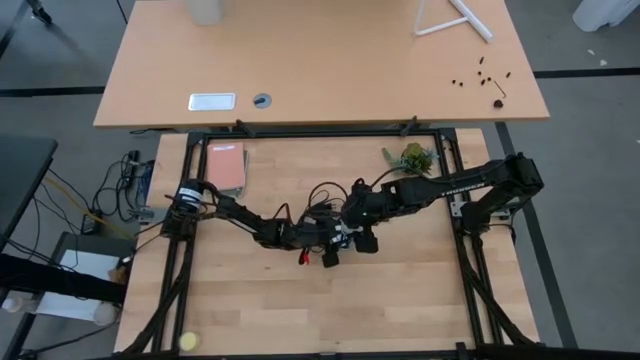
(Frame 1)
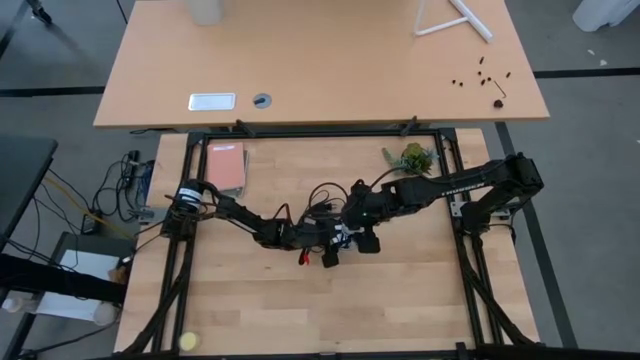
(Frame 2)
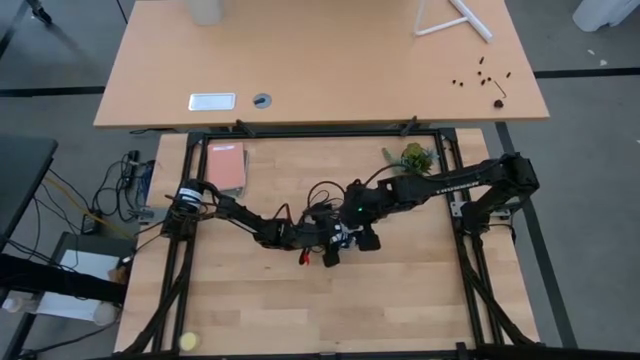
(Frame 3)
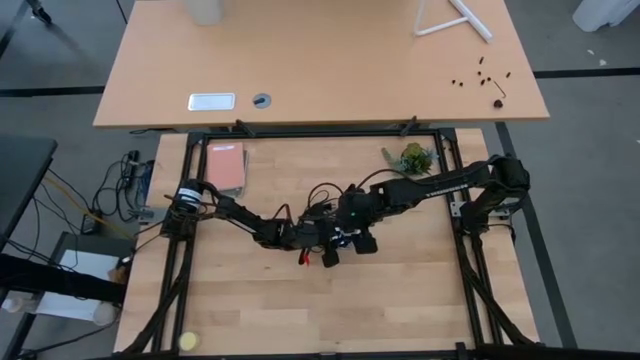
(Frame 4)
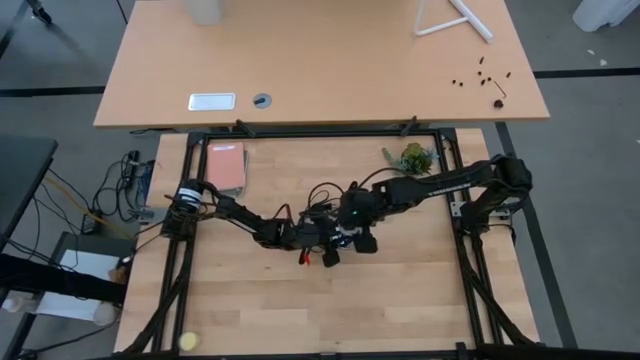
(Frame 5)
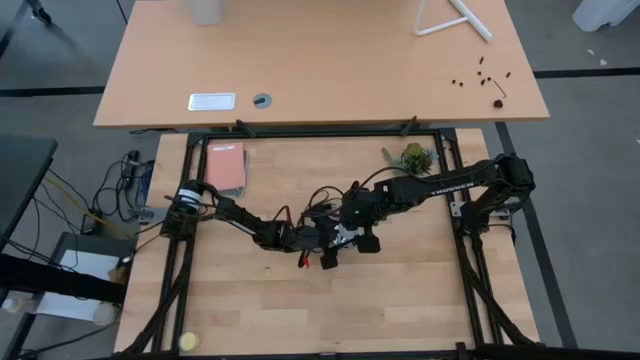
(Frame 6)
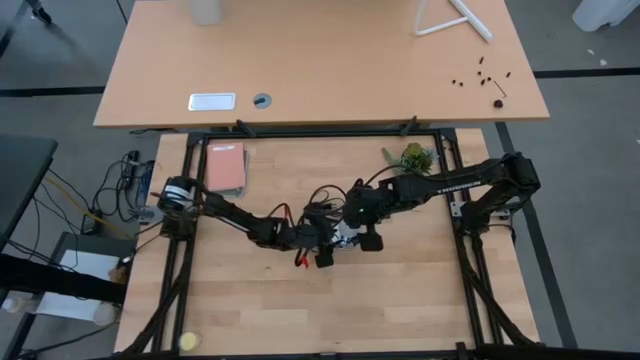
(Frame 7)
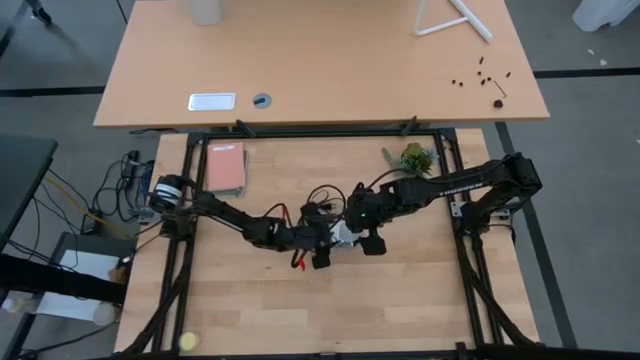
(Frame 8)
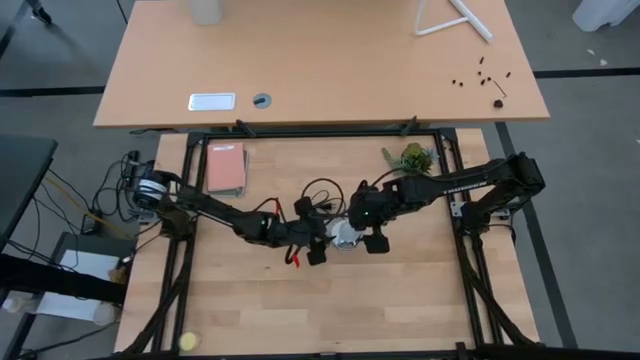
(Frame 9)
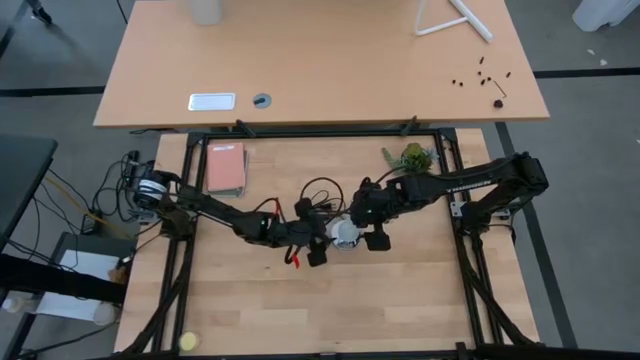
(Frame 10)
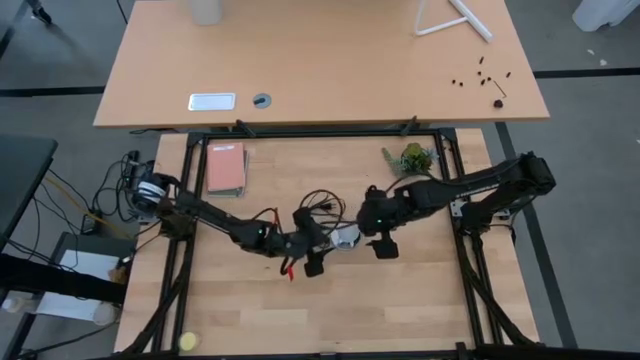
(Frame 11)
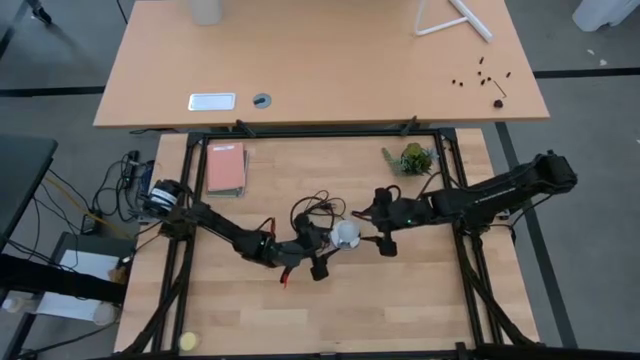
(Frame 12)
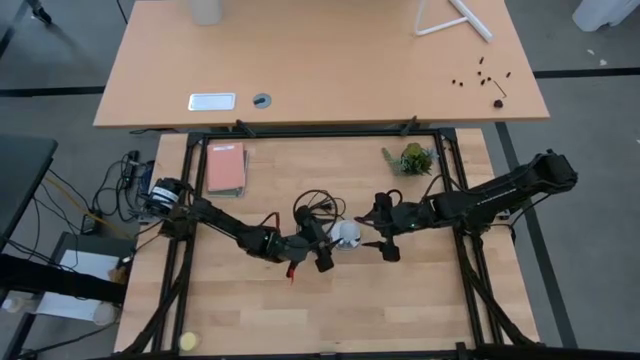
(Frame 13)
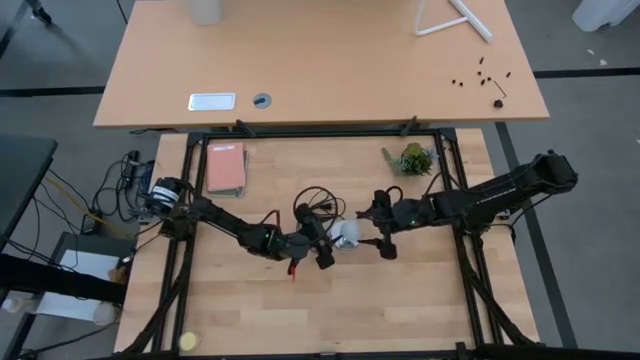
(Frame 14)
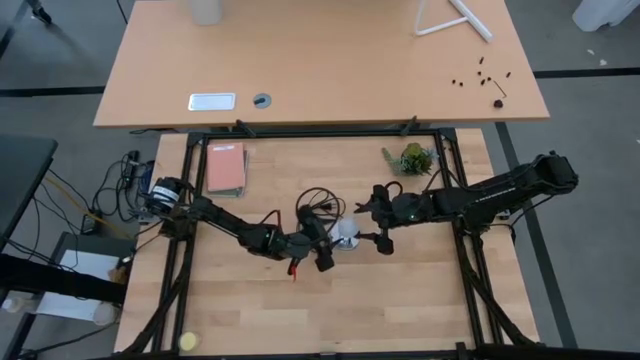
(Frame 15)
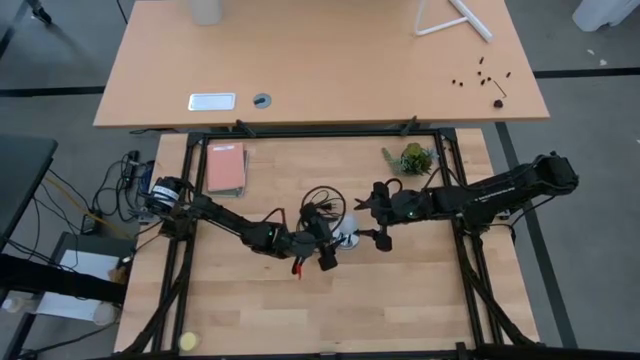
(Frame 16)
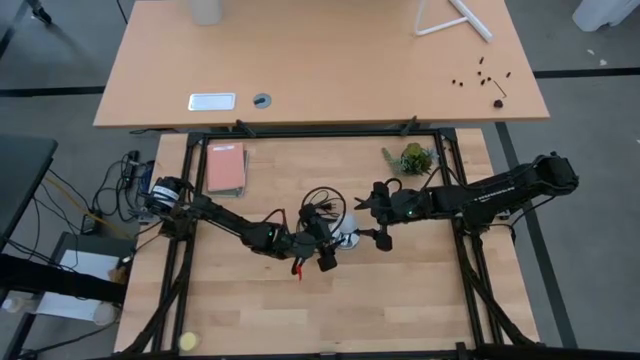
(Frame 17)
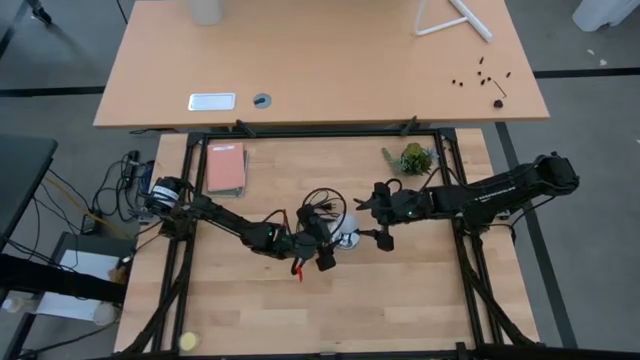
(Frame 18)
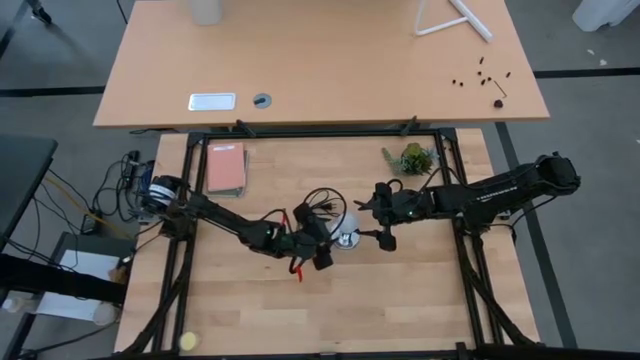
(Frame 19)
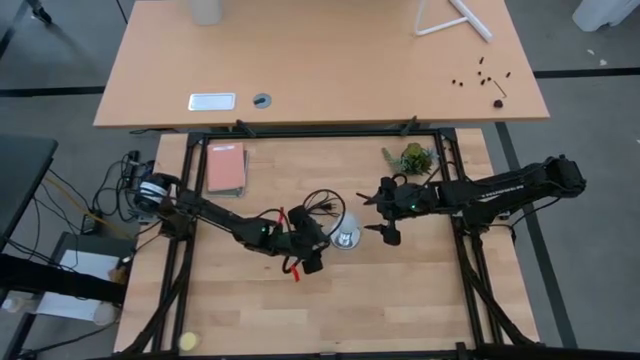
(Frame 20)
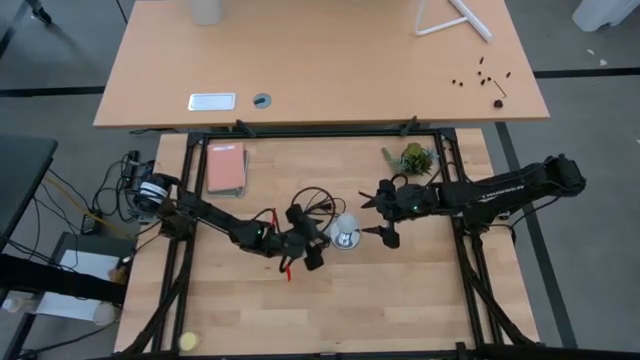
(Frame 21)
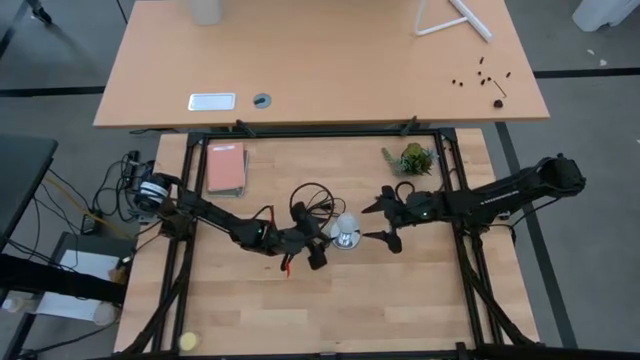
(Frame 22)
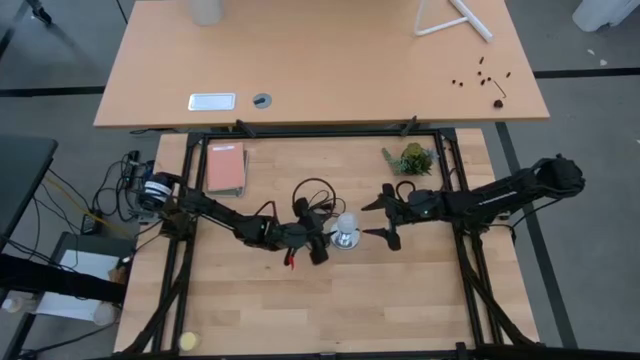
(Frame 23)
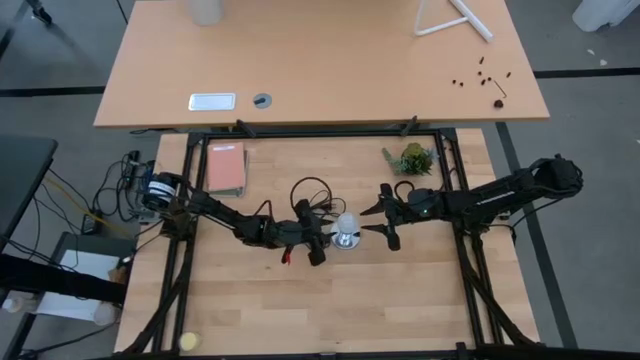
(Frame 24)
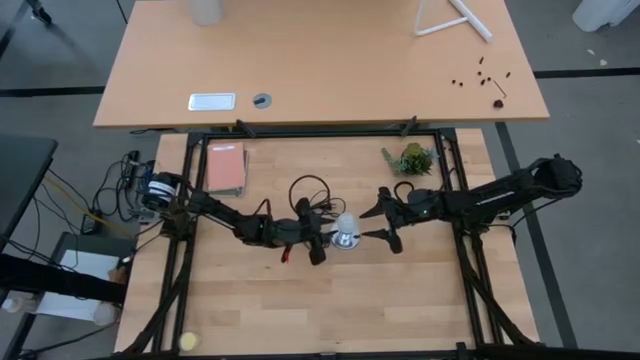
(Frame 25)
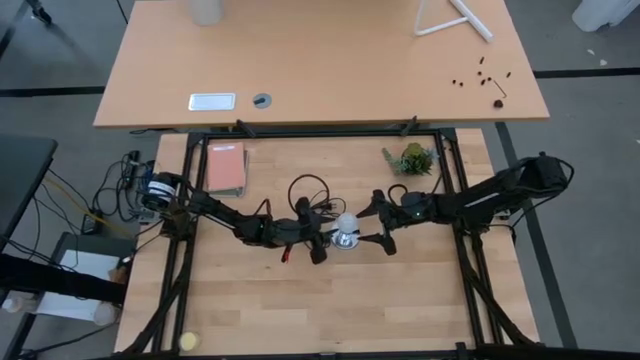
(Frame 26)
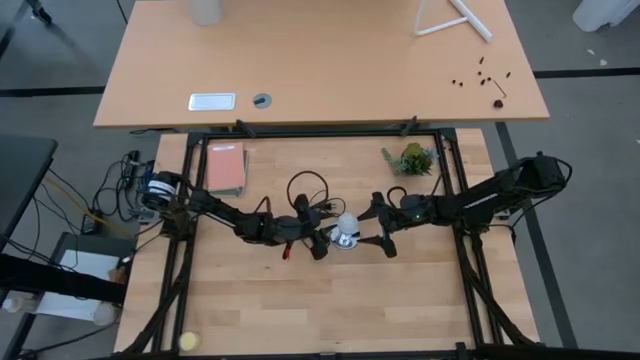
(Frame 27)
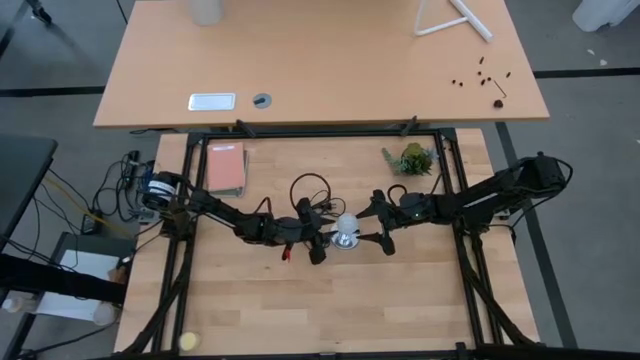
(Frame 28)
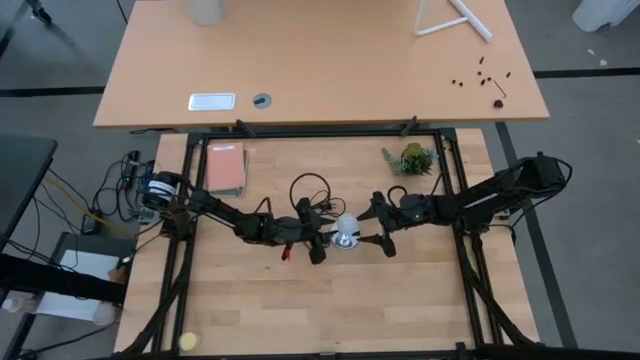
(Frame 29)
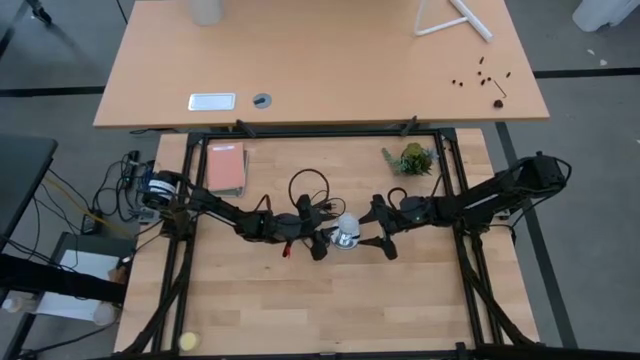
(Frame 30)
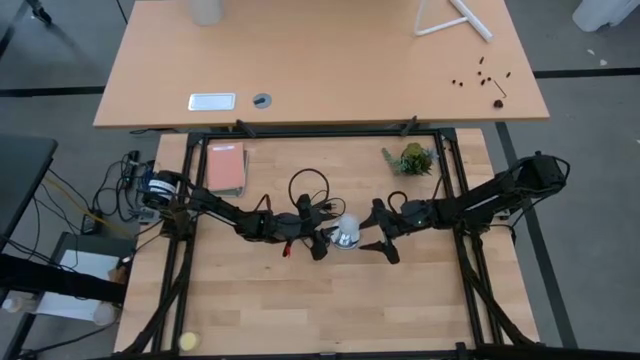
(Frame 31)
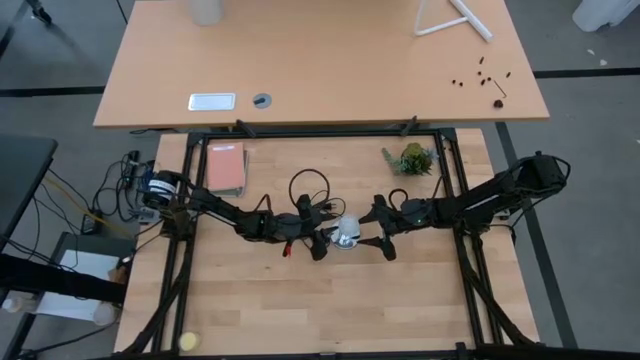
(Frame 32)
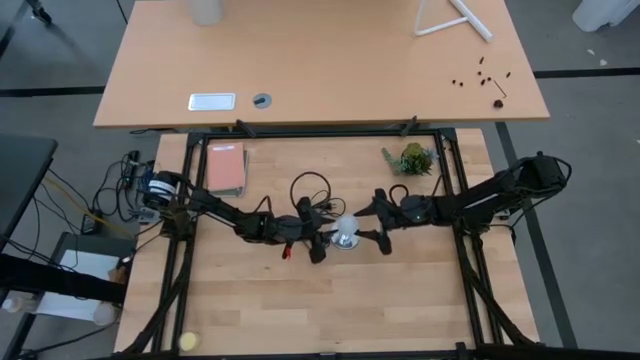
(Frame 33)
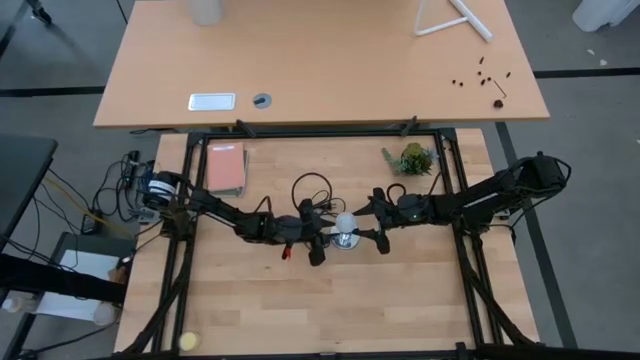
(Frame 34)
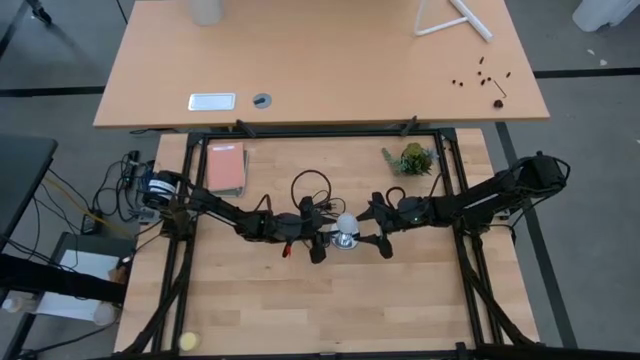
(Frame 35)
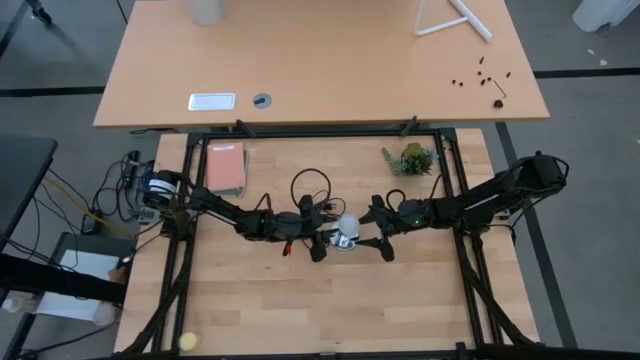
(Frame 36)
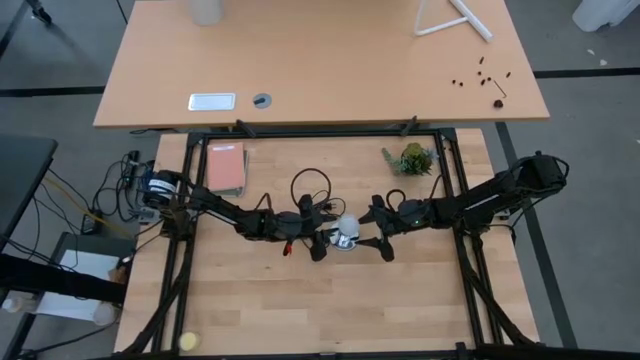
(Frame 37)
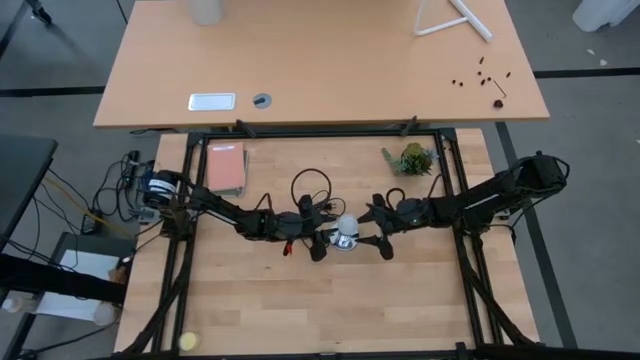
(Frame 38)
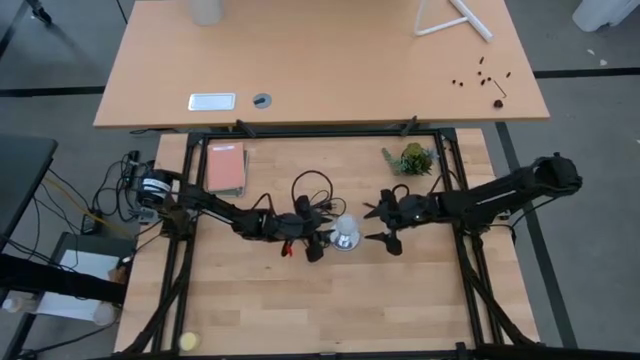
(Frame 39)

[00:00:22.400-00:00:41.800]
Task: Screw lightbulb
Insert the lightbulb into the lamp
